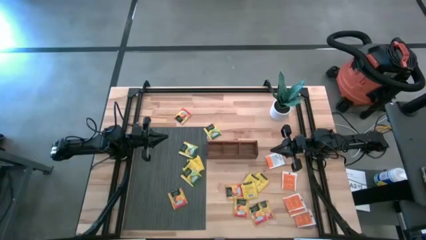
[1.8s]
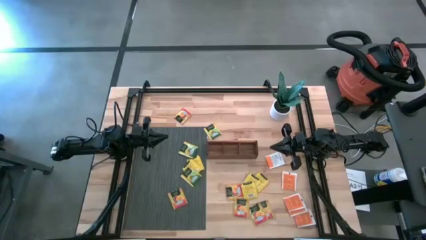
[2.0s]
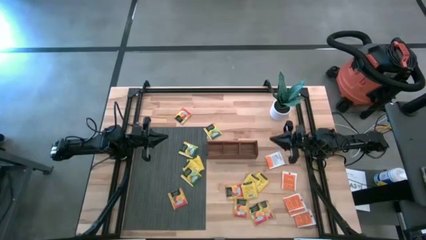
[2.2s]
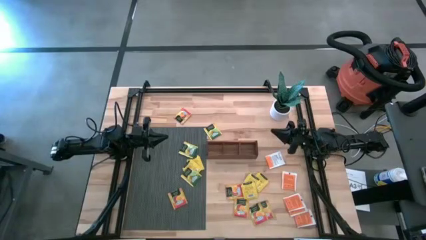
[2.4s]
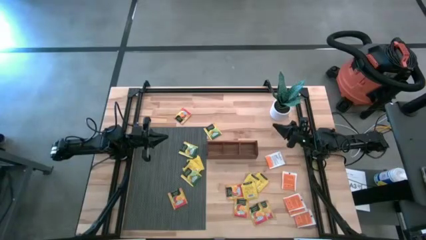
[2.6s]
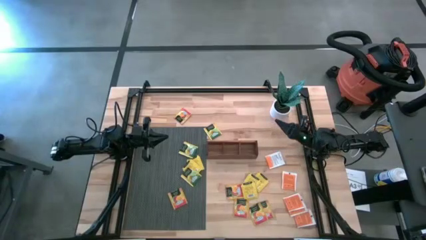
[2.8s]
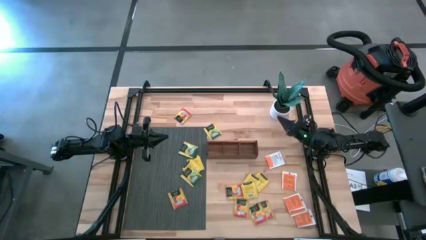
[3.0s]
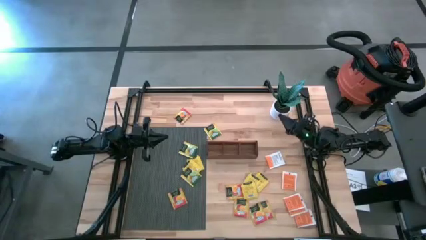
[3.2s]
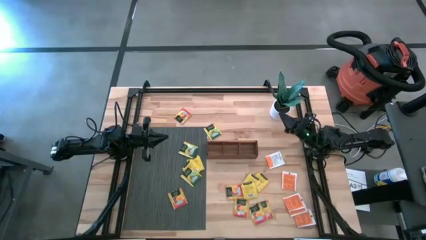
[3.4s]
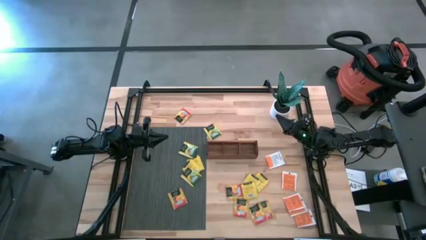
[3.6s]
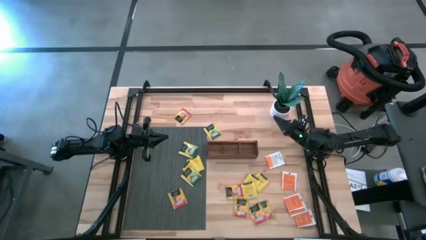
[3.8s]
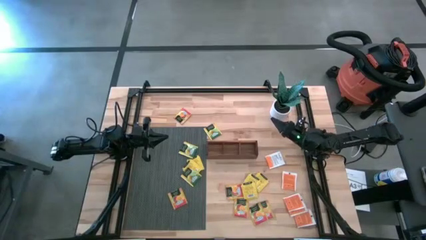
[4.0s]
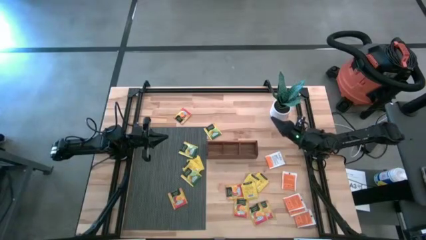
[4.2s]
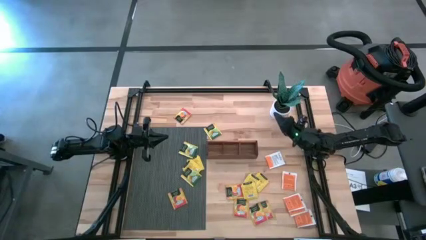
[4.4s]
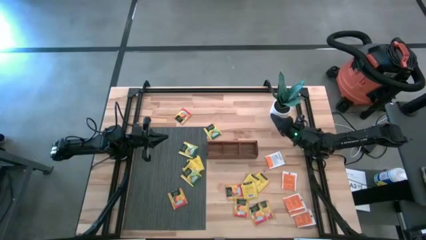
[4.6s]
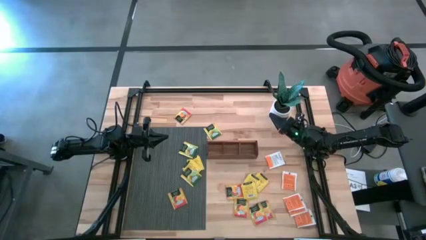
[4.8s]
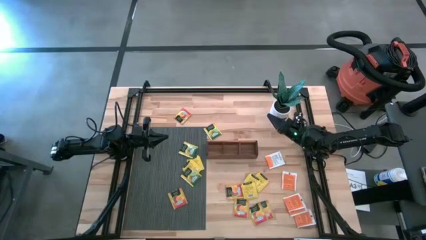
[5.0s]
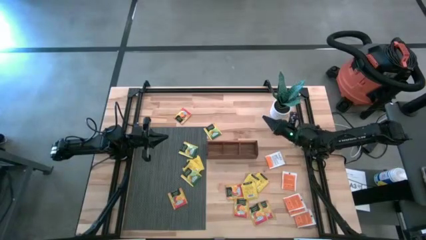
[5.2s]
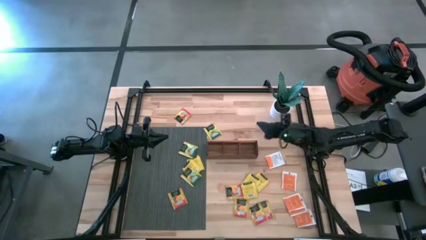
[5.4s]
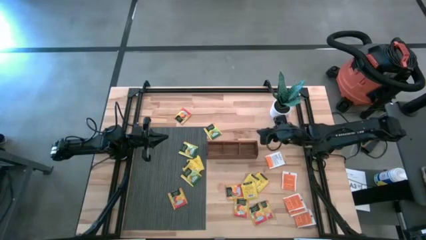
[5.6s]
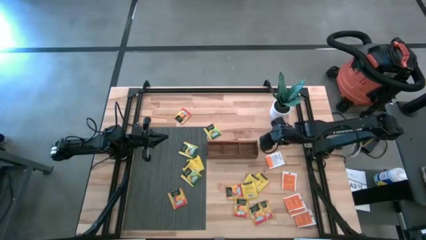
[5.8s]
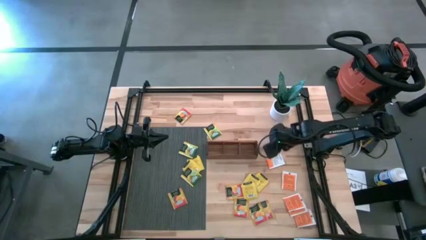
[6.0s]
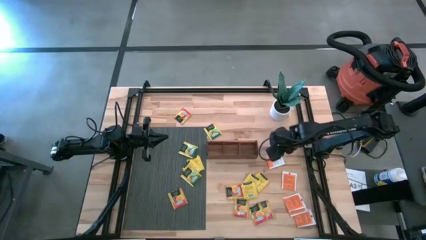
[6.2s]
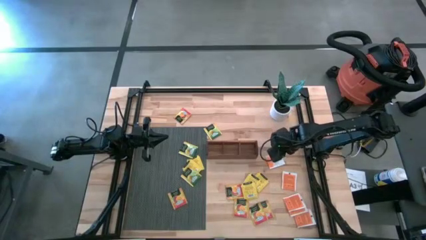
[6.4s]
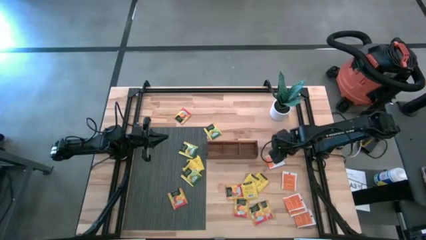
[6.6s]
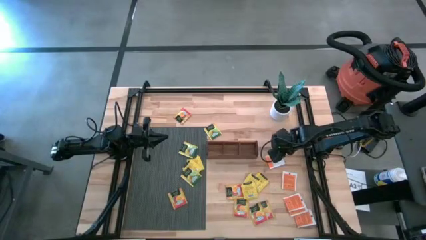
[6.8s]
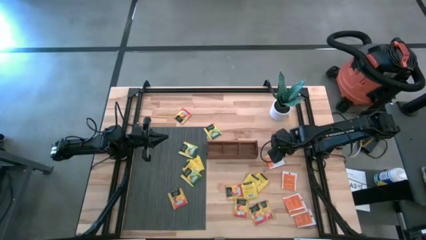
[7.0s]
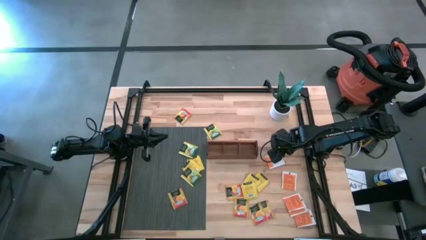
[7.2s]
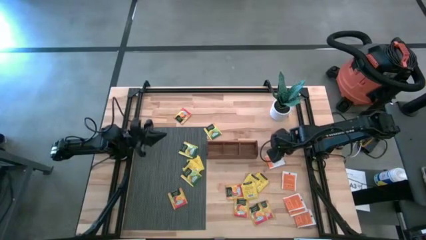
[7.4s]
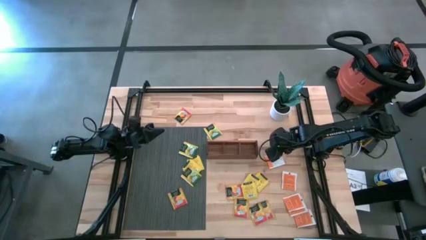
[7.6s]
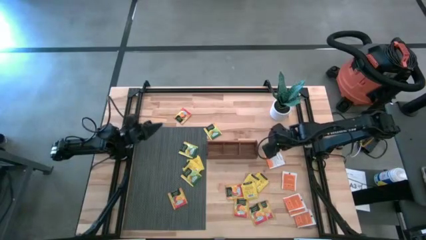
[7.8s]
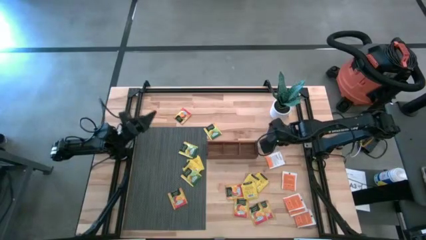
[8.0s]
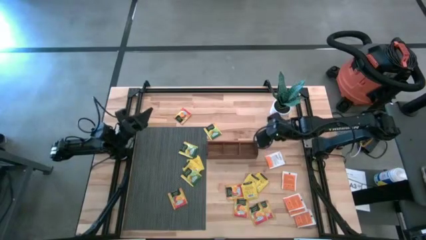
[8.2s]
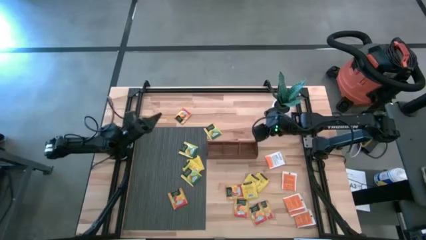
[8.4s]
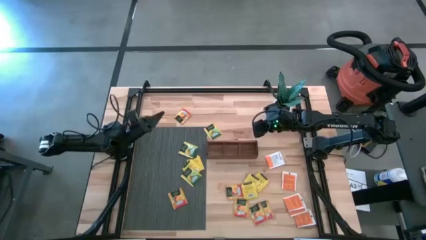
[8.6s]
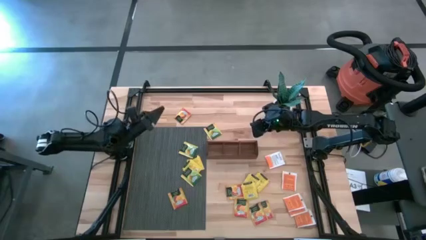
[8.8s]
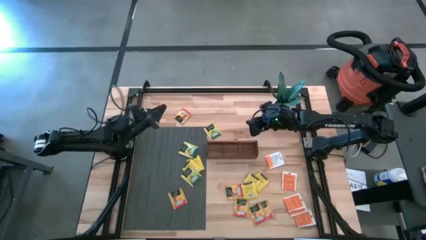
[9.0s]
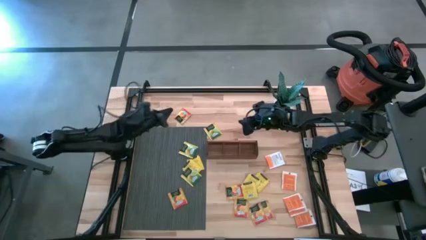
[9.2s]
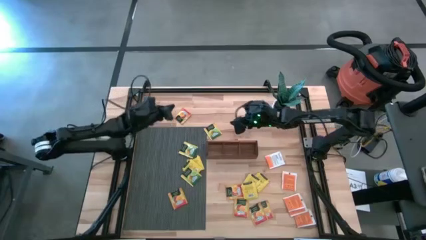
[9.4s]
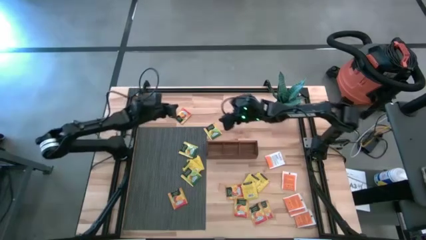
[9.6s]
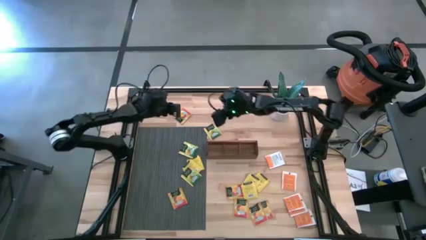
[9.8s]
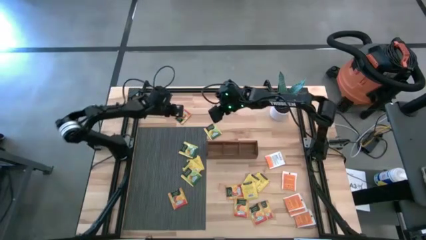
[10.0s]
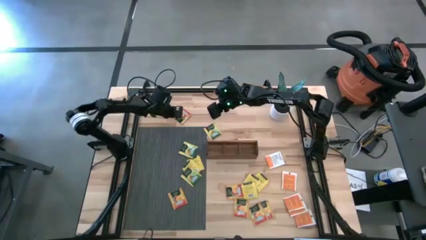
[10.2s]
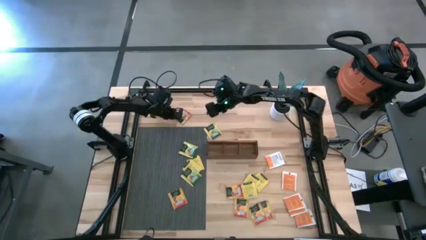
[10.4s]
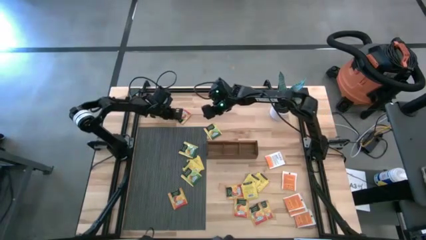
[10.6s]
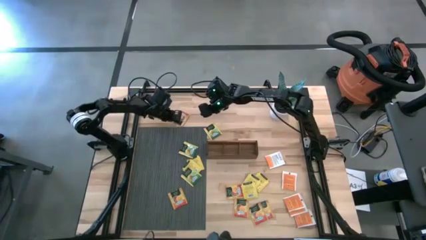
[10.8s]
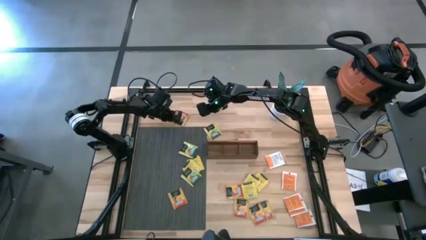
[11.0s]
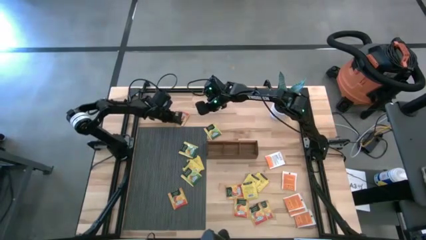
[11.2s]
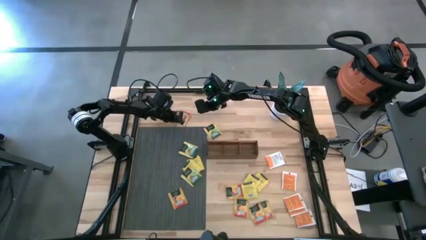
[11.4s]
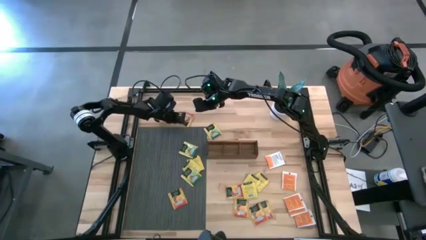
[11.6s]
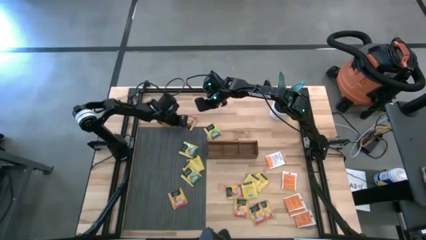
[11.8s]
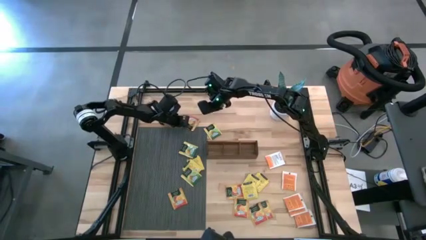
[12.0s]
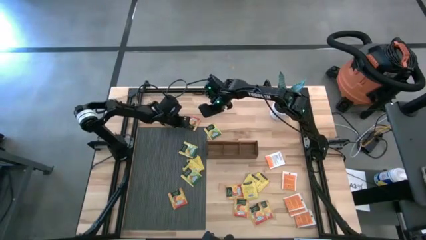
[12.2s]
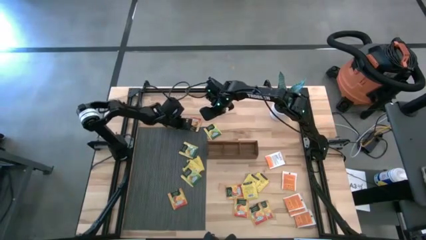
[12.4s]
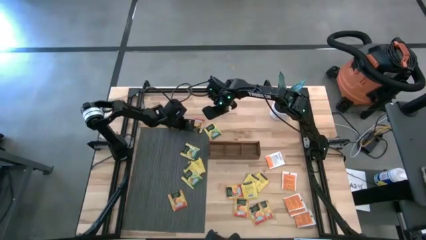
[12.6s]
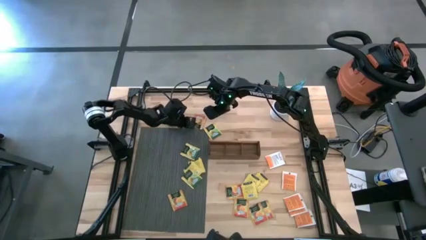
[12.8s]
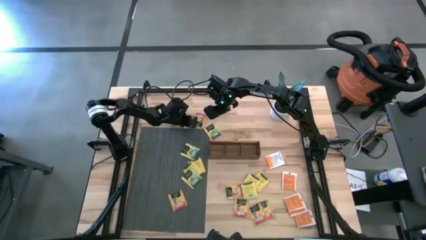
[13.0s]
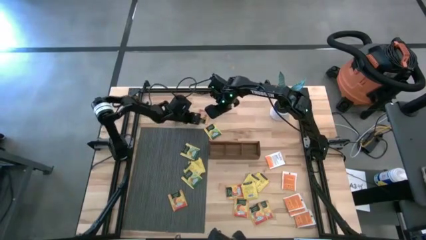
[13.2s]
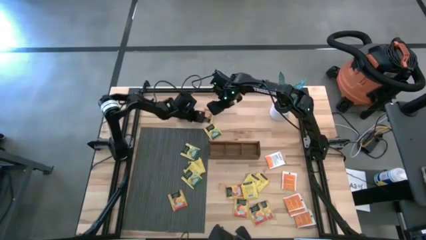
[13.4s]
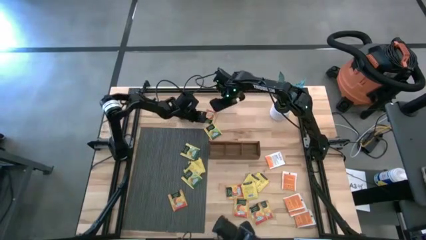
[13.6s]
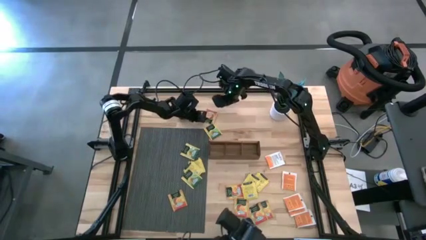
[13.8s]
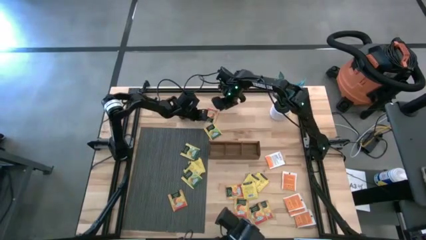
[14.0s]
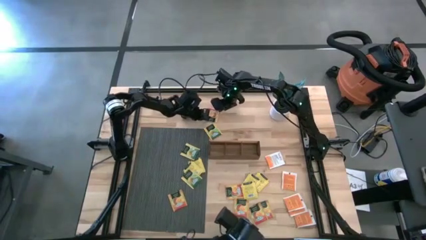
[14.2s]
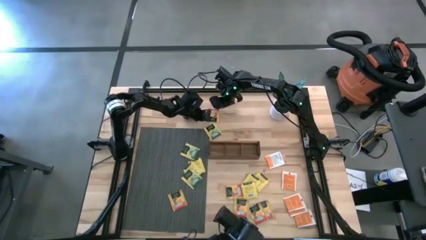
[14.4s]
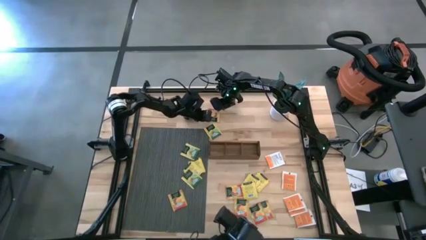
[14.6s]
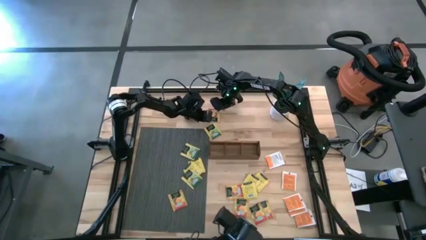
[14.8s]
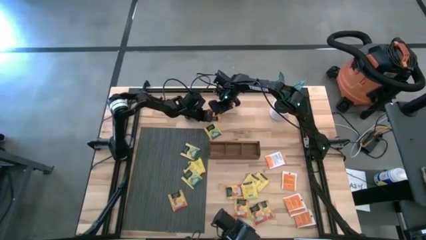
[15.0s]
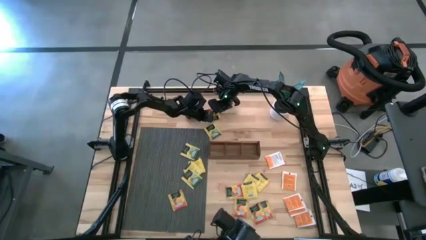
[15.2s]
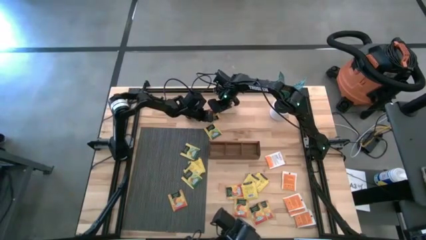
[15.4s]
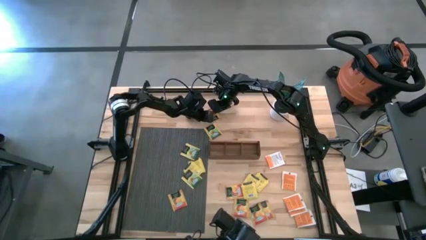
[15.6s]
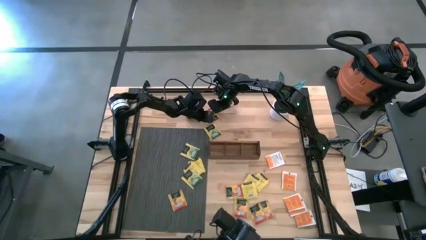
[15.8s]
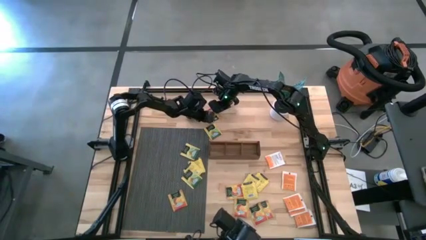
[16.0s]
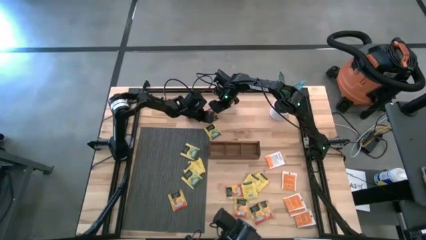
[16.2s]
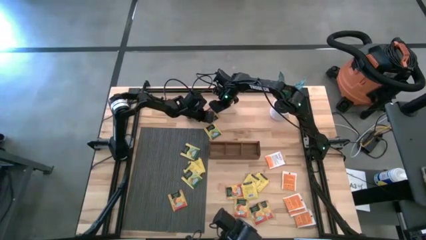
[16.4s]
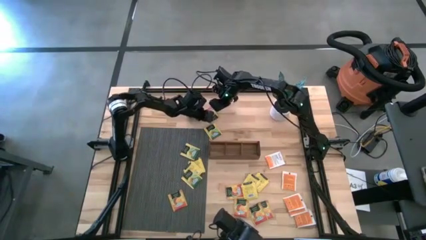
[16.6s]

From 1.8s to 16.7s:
Task: Pick & Place Tea
Put the orange tea bag into the left section of the wooden organizer
